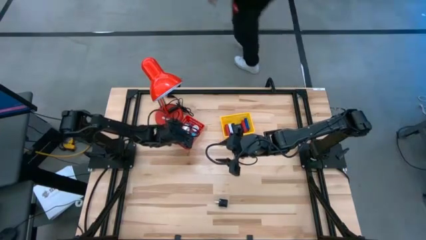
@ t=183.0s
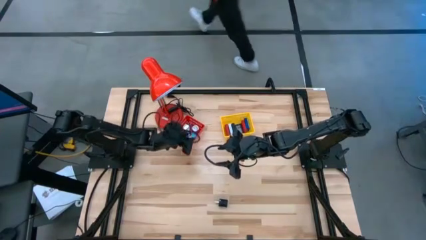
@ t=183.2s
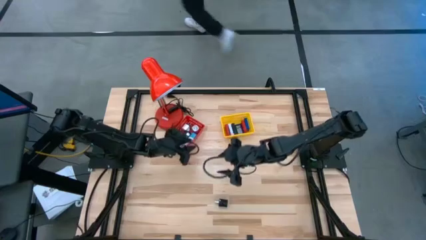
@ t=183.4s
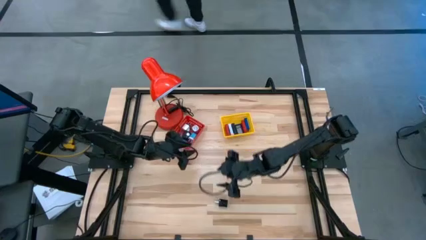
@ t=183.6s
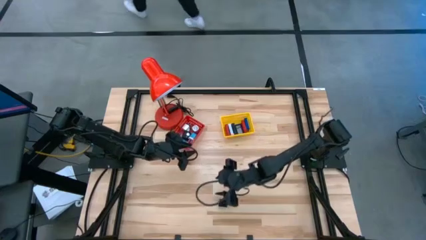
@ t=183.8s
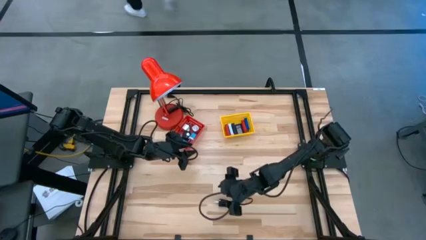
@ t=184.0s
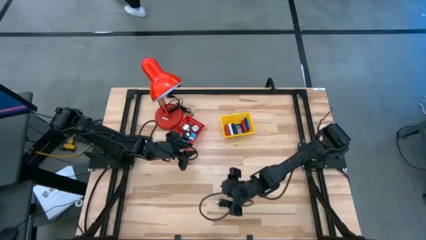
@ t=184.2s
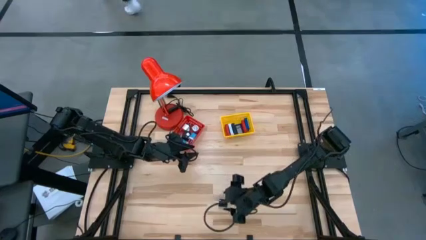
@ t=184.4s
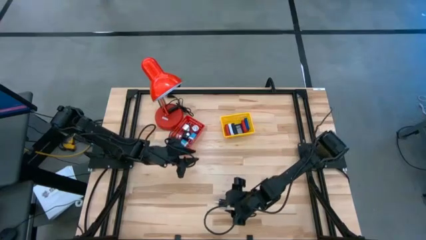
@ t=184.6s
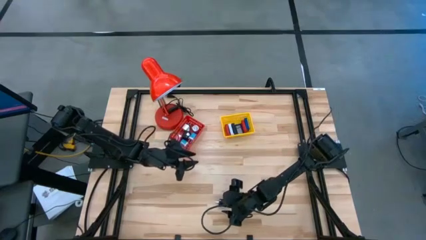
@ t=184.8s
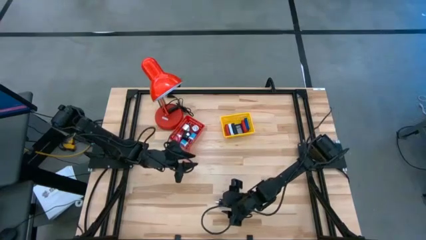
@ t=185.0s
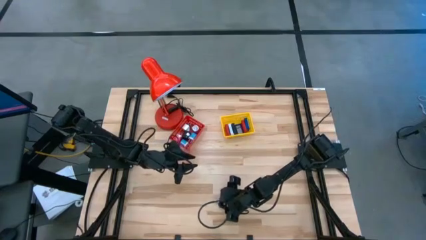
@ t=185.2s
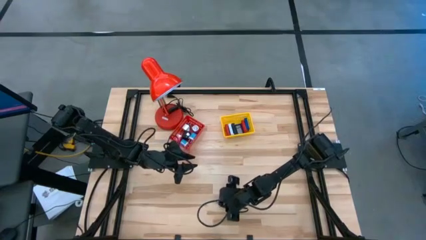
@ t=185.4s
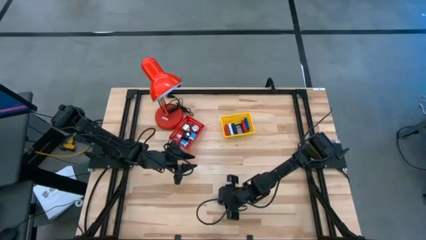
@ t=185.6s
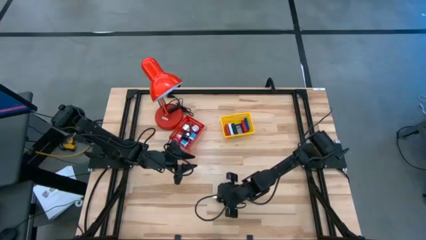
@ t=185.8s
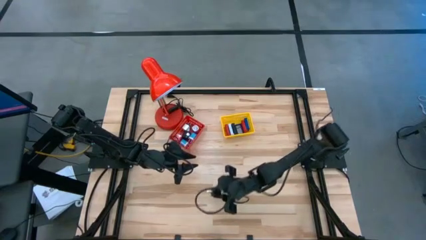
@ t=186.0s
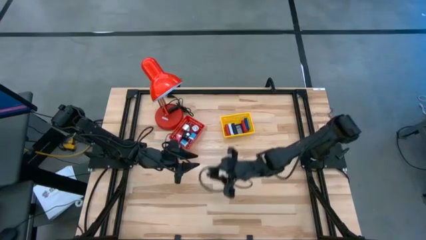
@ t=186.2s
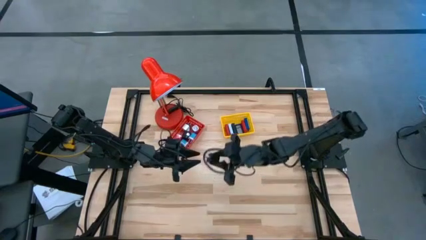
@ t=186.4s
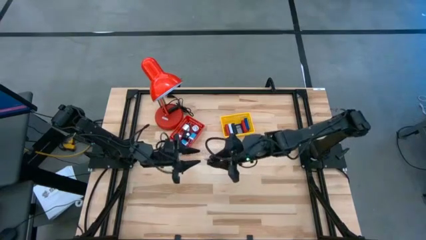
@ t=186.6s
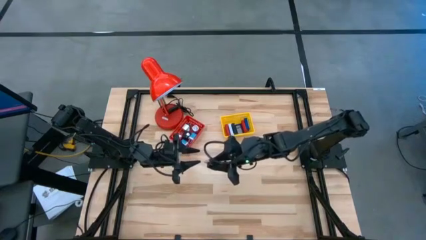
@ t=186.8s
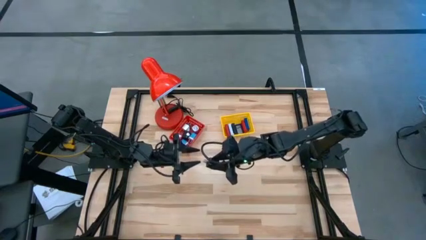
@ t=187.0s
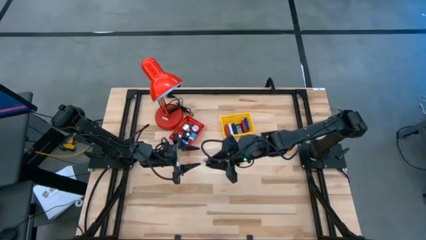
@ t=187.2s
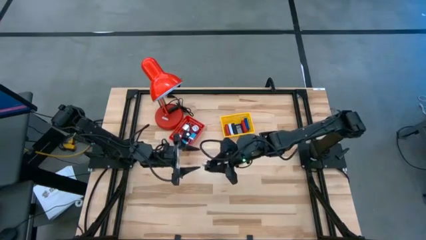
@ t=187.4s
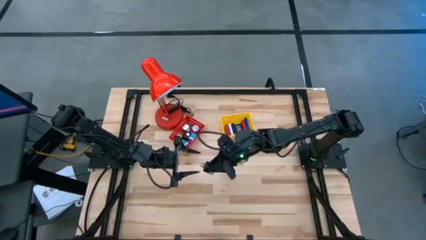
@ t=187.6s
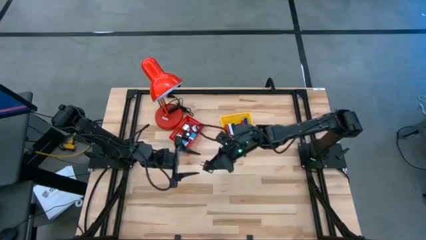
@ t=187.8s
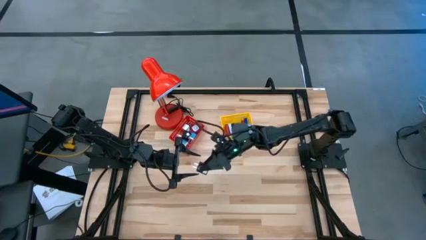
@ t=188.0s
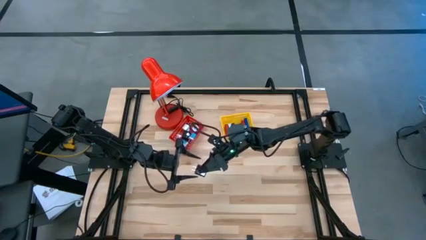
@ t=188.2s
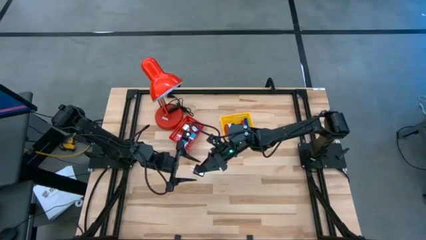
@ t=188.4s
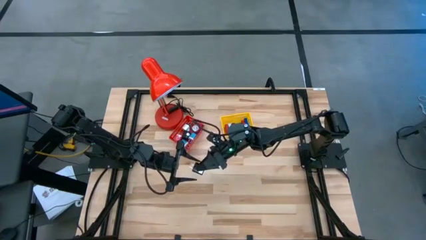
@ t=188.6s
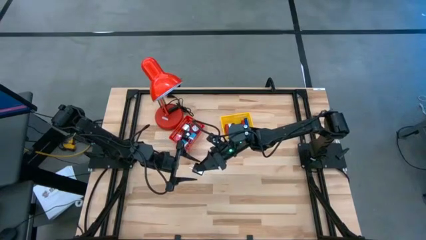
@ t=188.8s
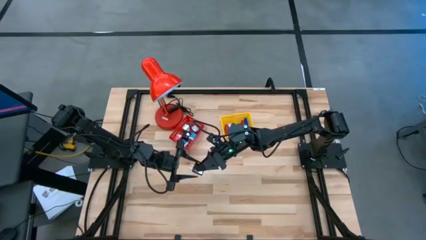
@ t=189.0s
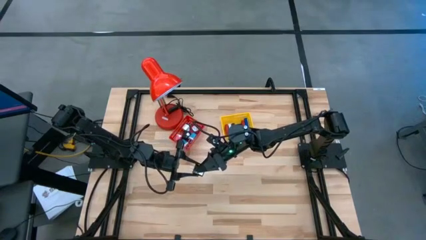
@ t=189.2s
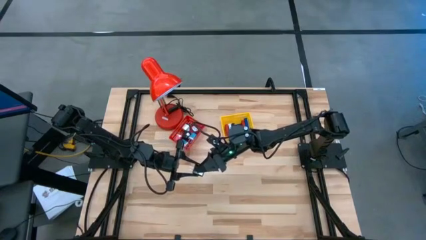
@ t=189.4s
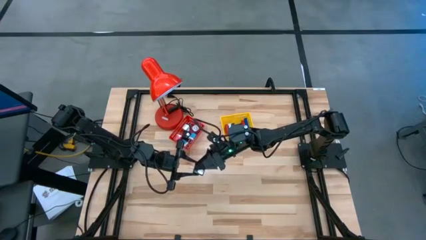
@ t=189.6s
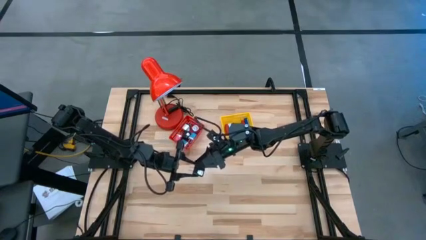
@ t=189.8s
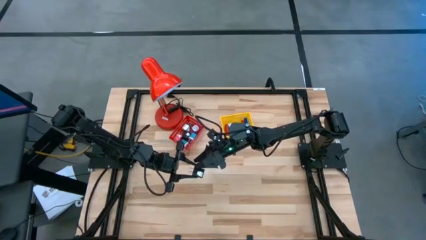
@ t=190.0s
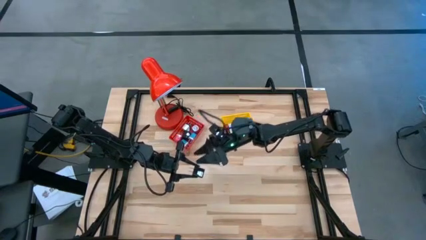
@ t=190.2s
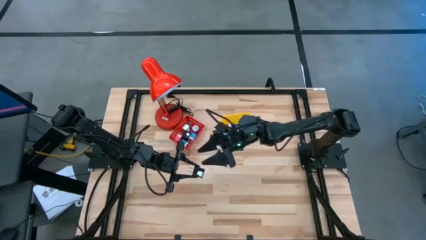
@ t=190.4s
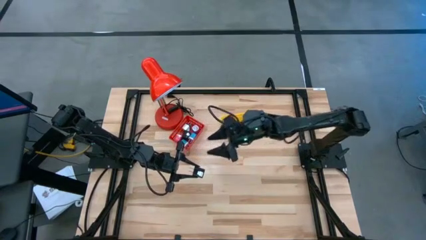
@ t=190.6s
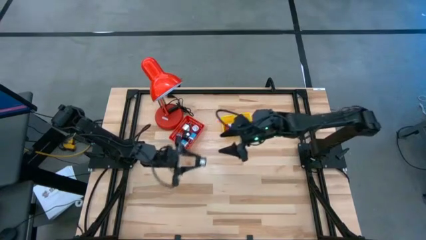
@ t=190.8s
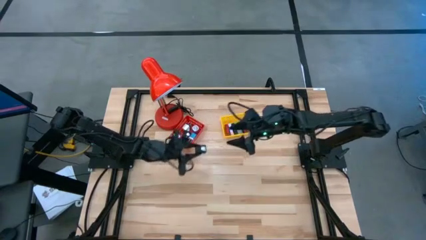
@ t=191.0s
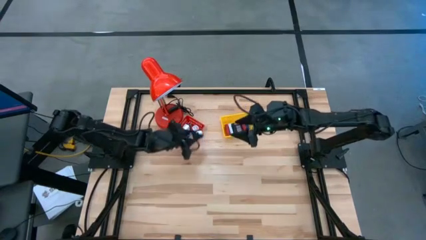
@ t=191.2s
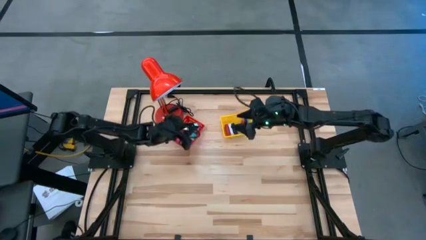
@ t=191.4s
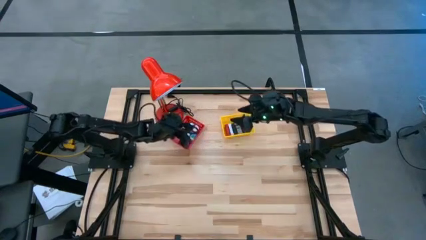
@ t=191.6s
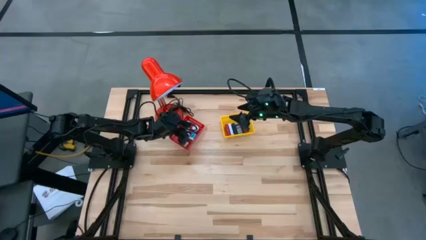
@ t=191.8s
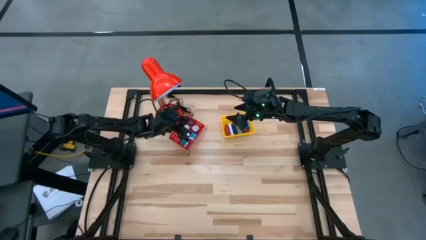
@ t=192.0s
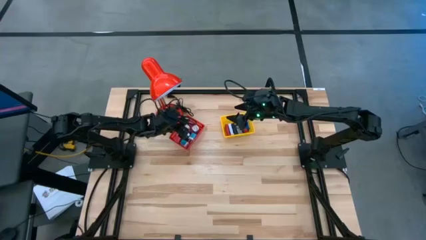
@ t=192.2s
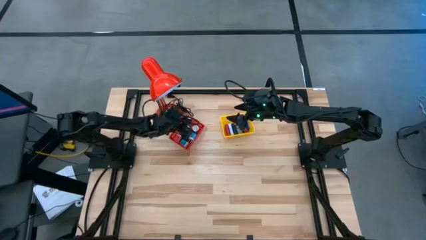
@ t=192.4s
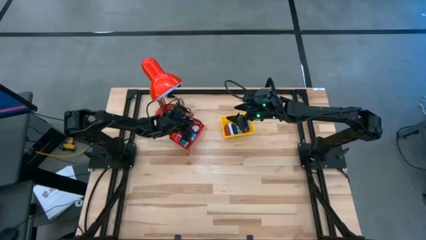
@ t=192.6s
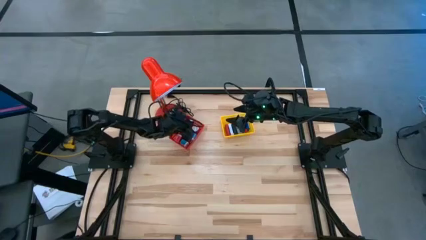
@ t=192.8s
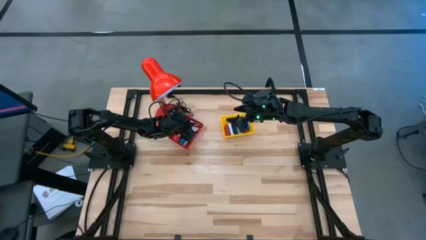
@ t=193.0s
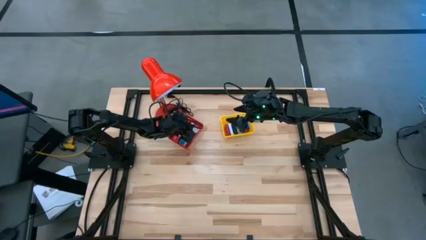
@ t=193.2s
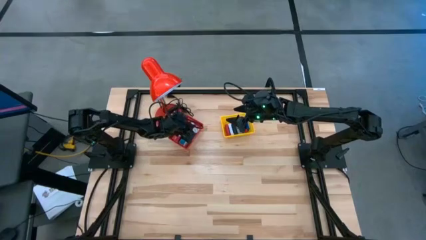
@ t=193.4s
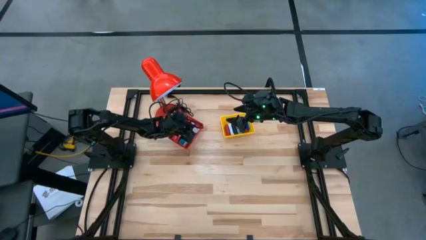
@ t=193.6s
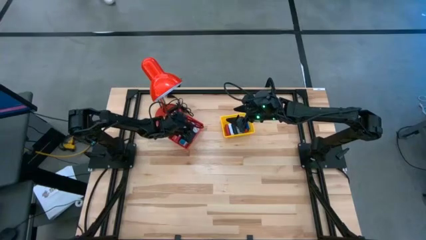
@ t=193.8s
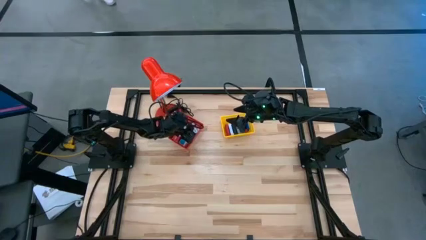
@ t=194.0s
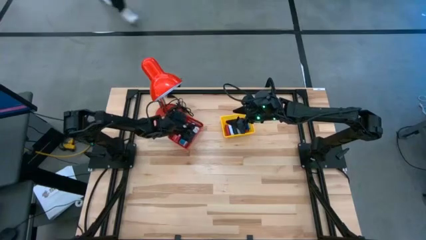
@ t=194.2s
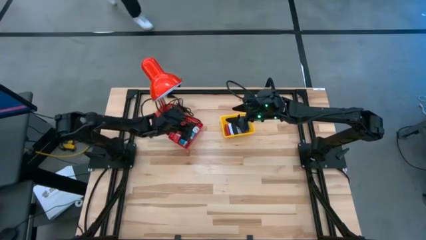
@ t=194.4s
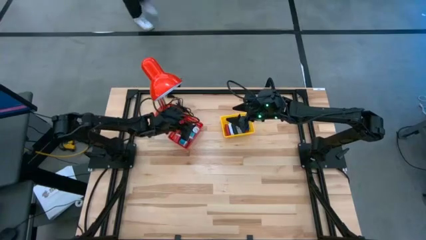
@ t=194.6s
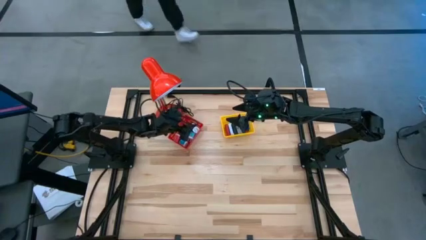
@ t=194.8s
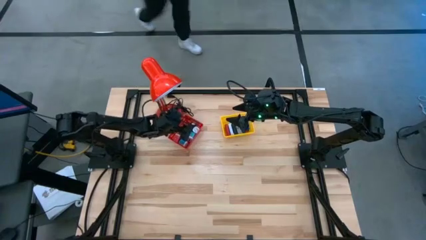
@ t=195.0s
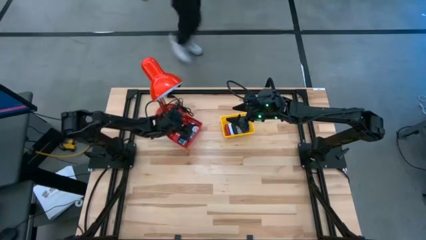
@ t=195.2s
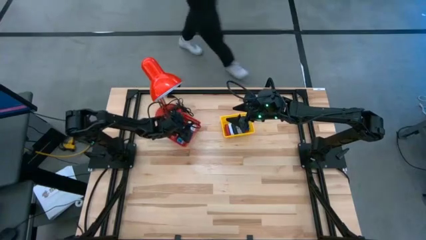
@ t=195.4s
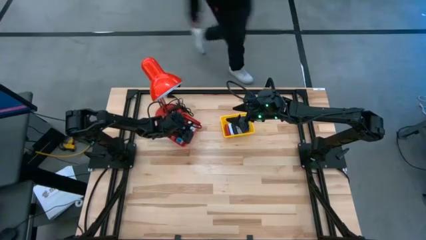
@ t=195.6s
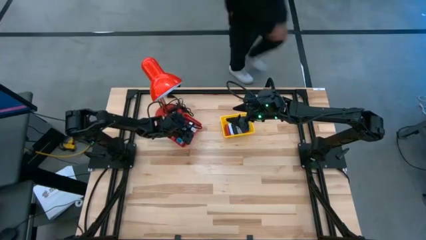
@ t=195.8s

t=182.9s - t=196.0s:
Task: Pick & Place Office items
Put the black charger adapter into the red bin
